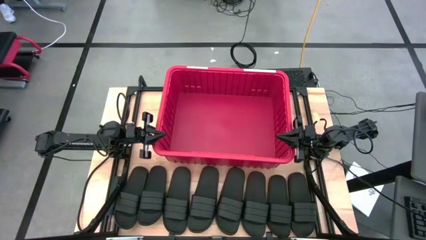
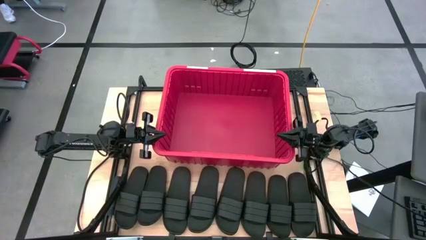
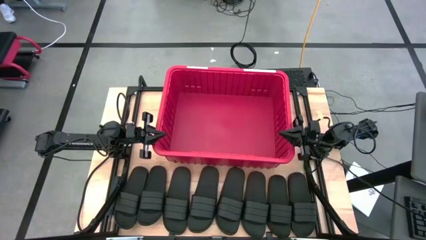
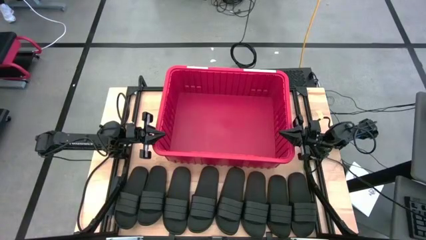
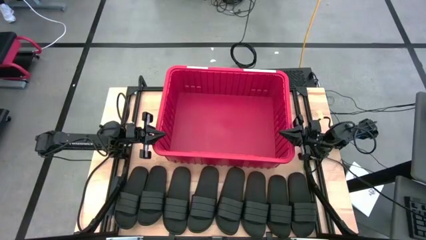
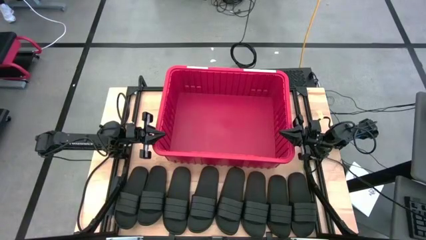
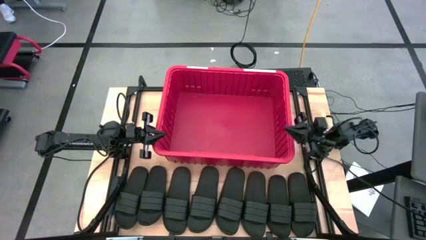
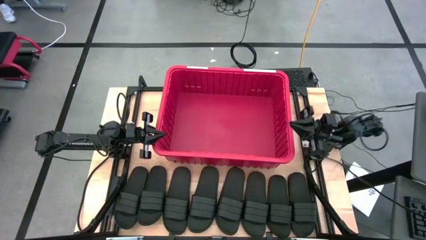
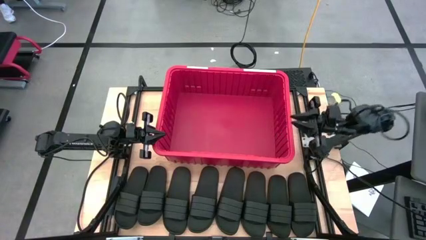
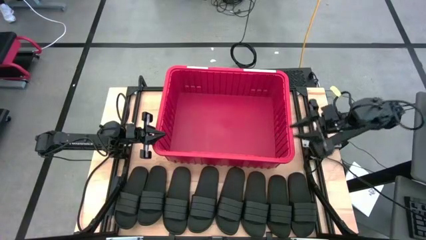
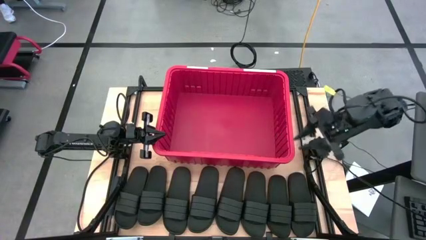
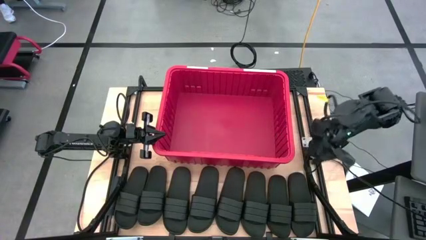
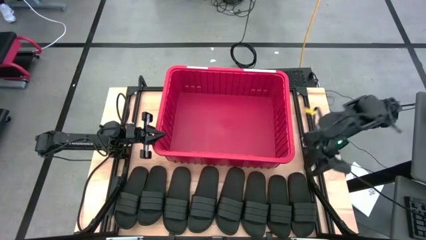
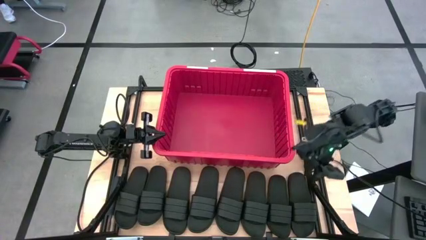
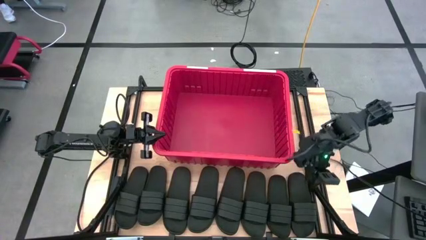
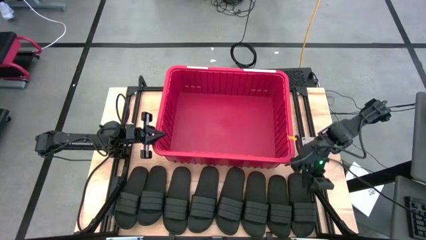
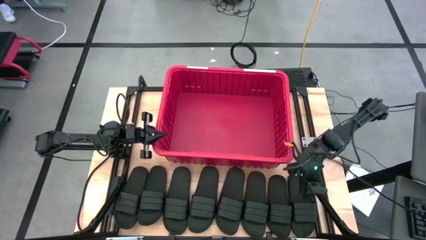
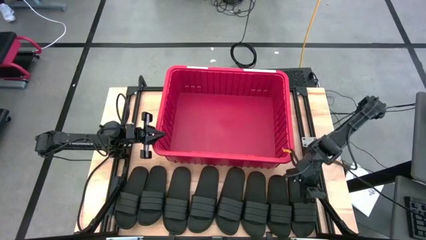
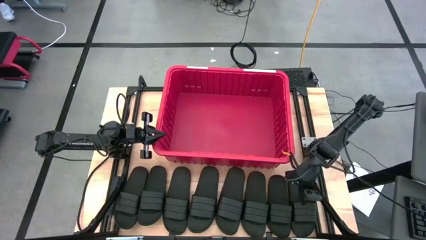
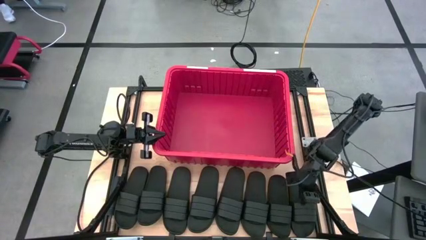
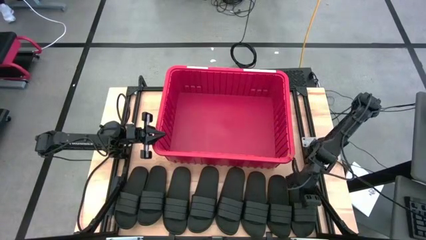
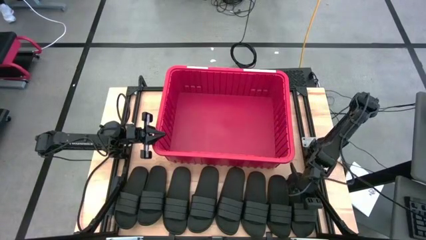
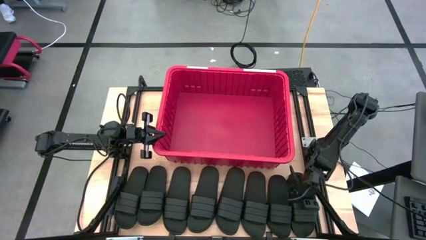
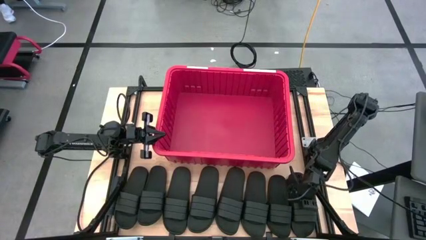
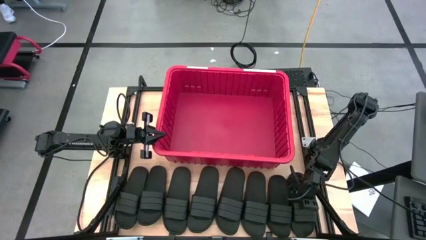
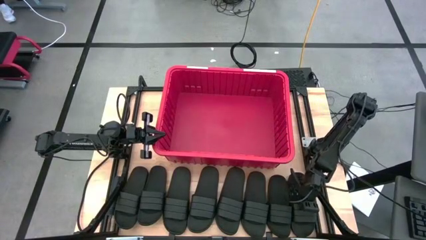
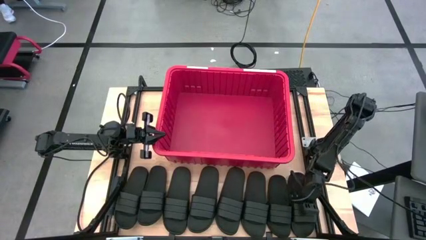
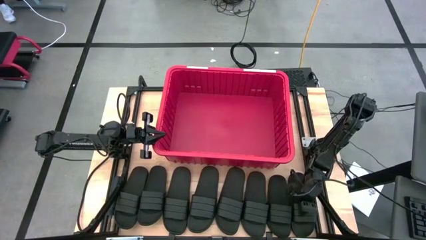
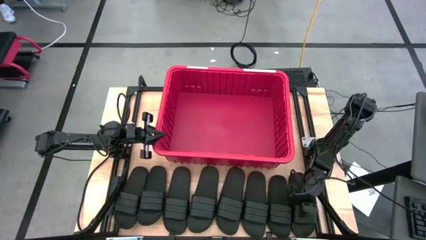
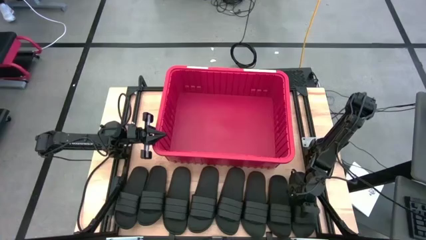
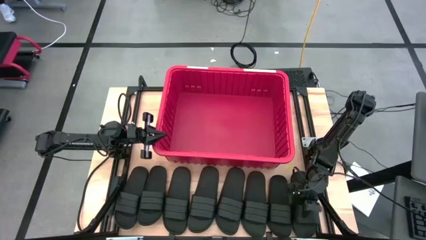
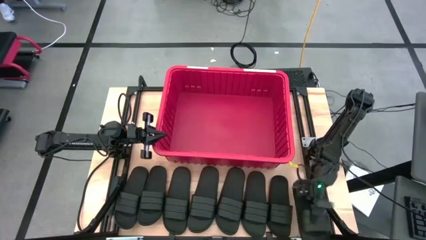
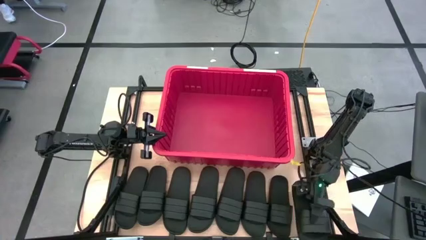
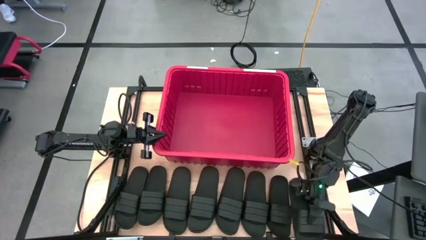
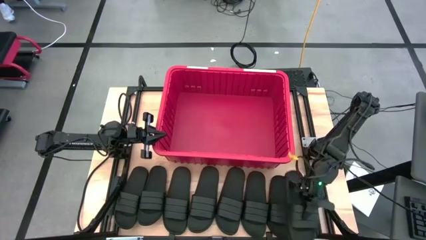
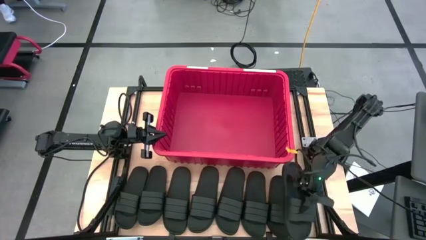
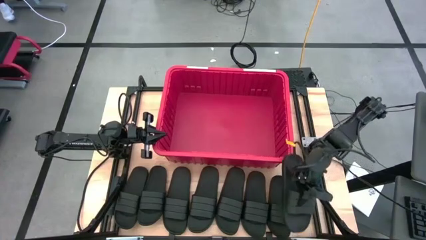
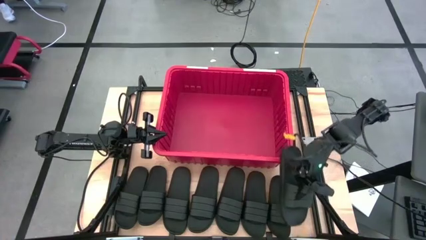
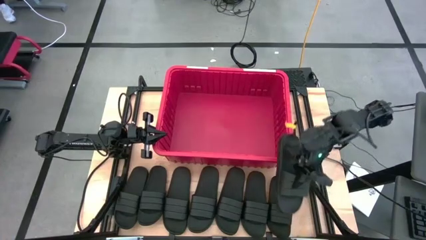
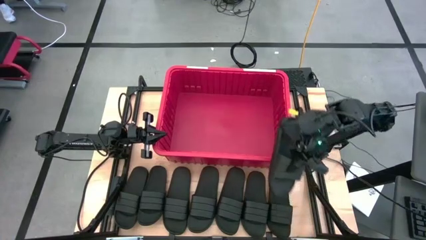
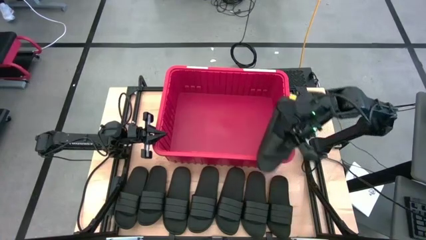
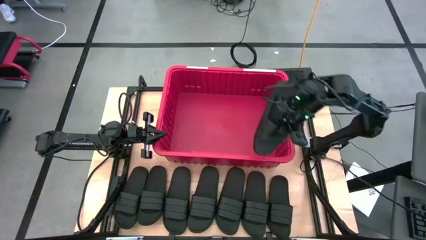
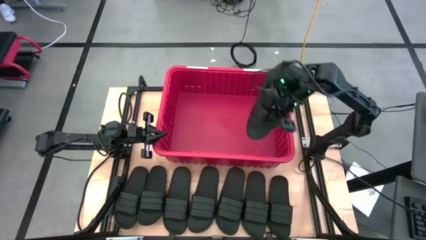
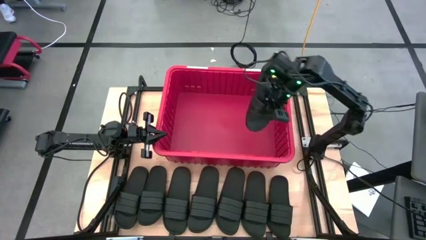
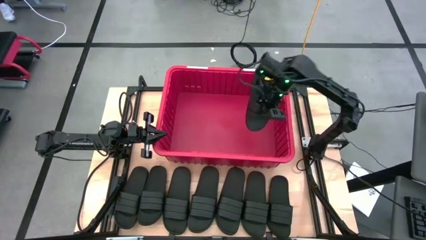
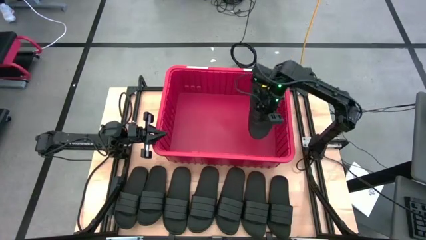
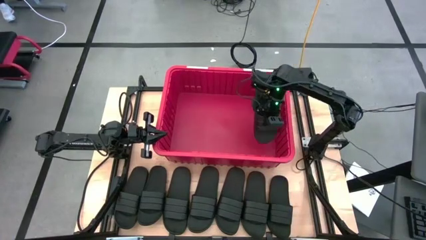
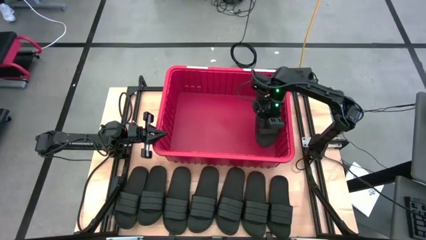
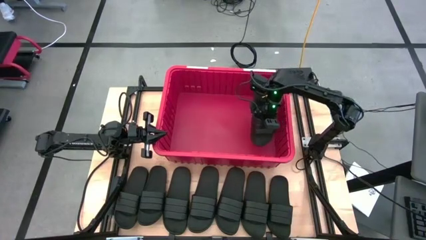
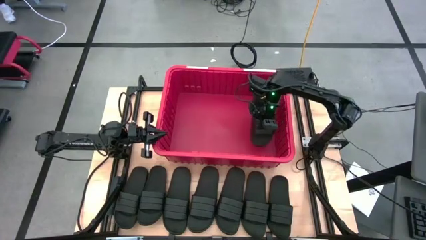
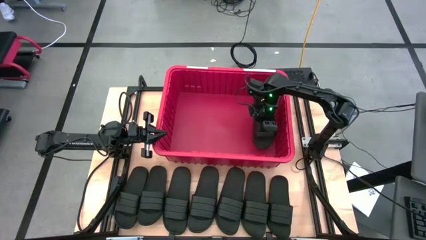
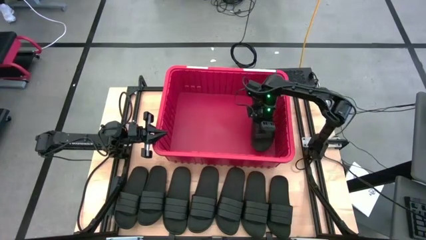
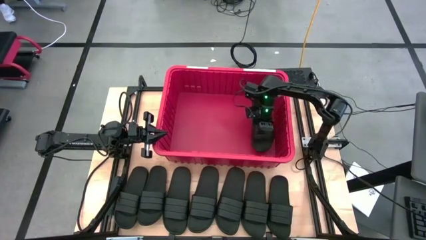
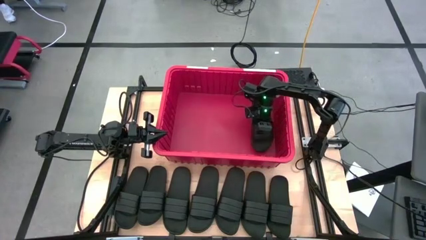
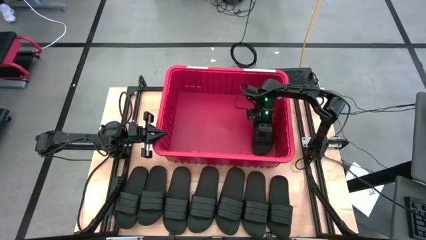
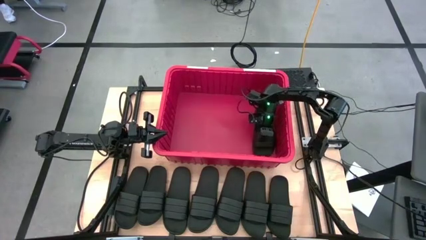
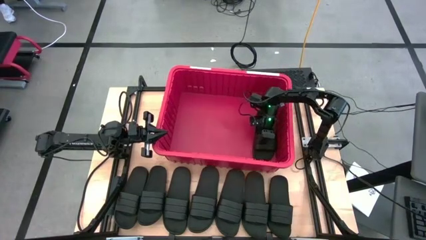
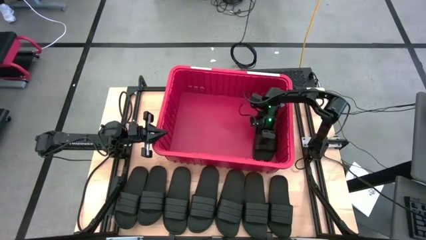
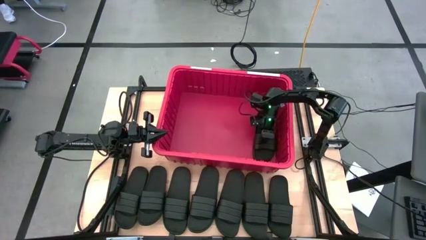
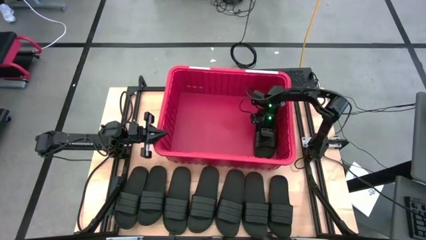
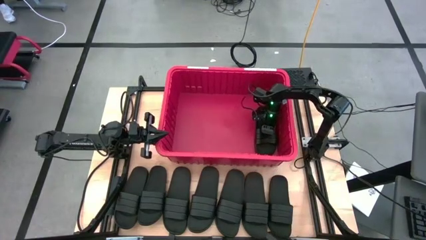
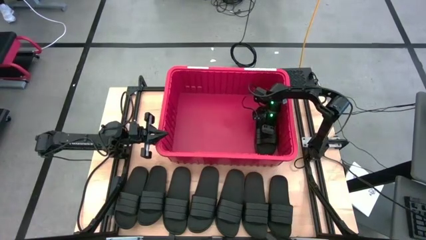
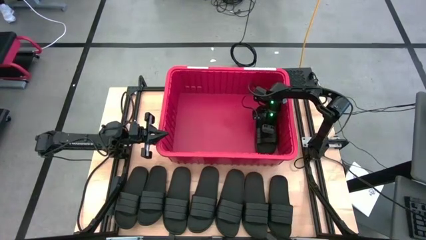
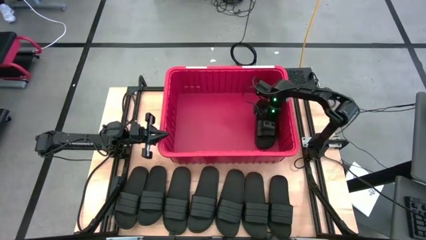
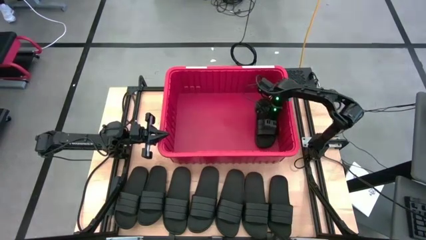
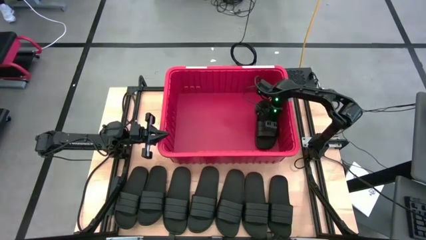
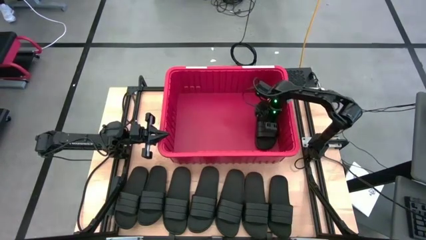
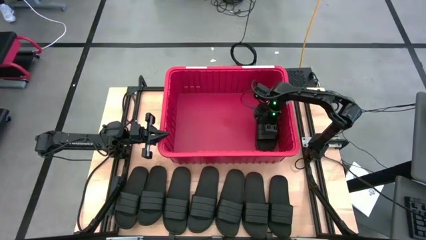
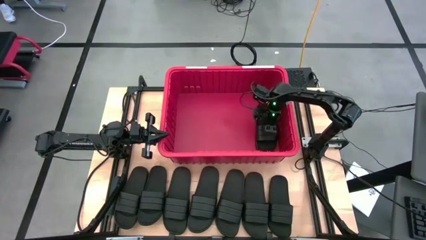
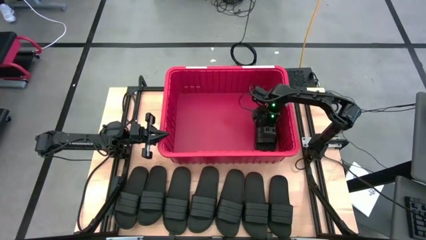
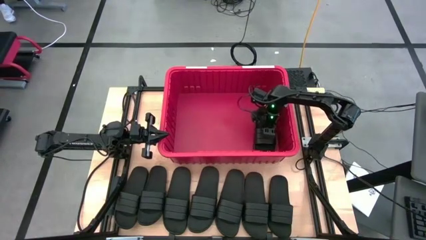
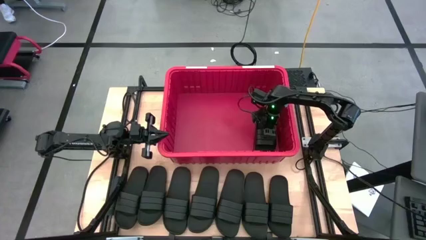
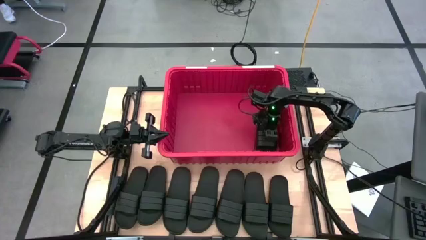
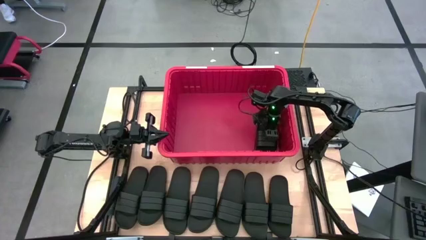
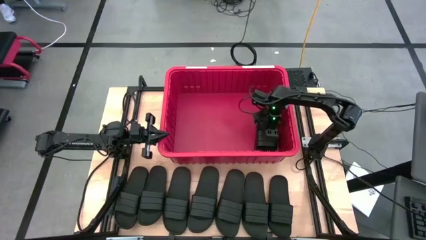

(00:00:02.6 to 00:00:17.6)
Task: Pick and place slides into bin
Put the black slide into the red bin
